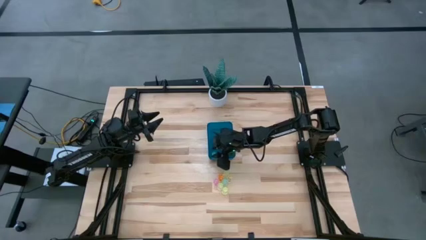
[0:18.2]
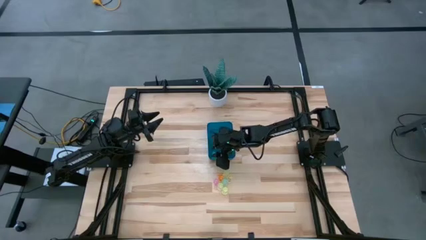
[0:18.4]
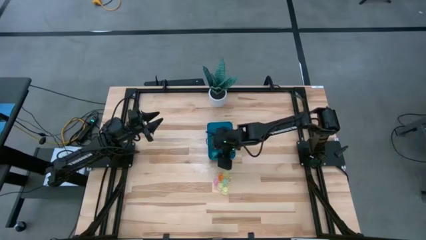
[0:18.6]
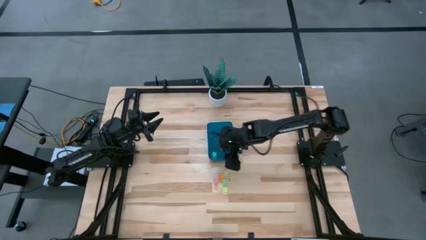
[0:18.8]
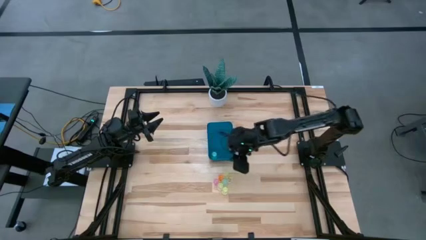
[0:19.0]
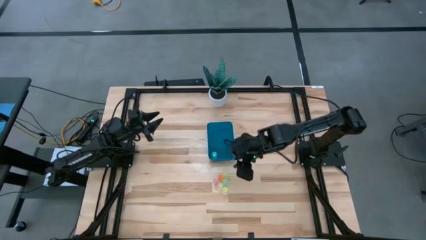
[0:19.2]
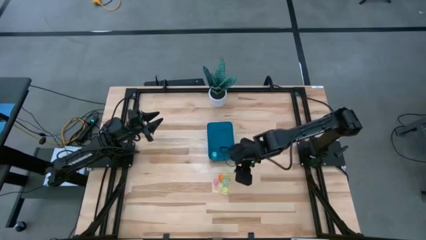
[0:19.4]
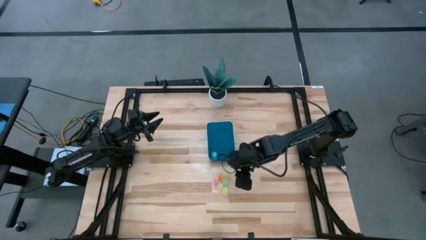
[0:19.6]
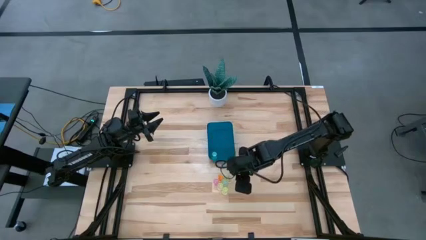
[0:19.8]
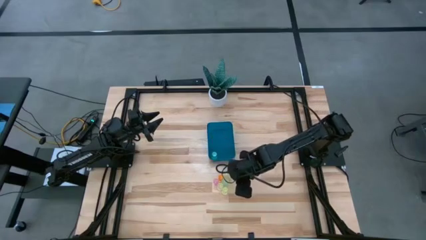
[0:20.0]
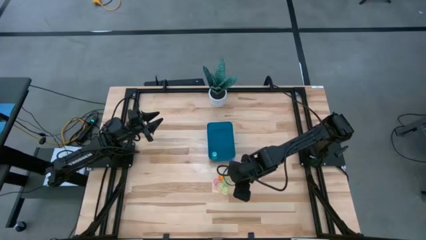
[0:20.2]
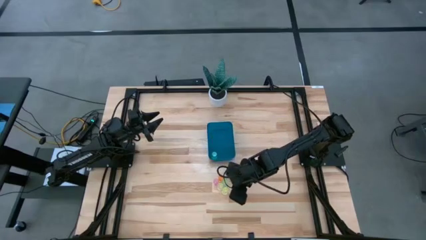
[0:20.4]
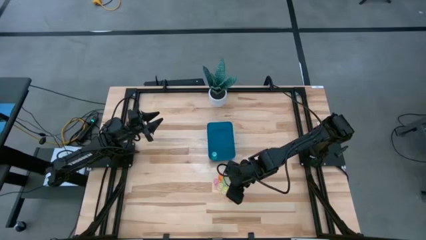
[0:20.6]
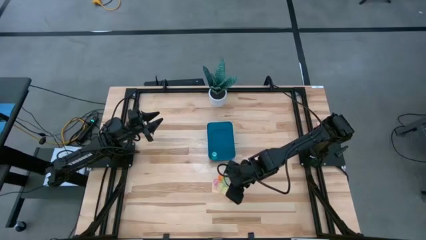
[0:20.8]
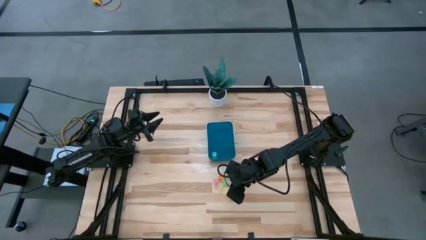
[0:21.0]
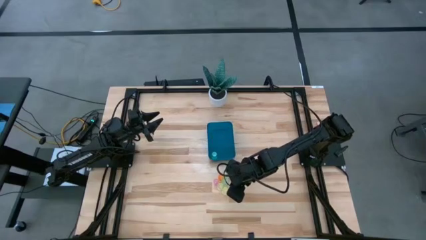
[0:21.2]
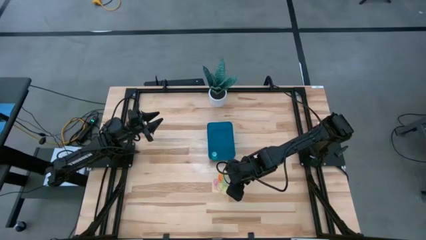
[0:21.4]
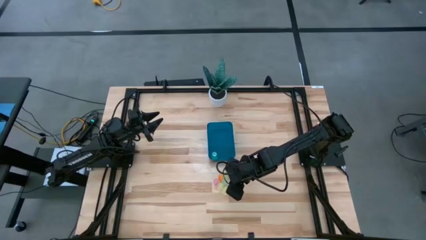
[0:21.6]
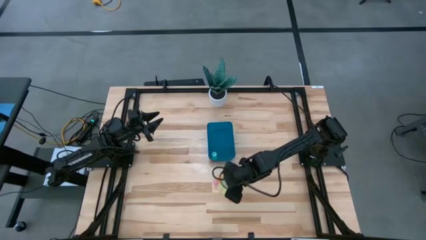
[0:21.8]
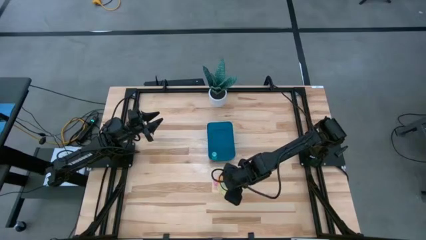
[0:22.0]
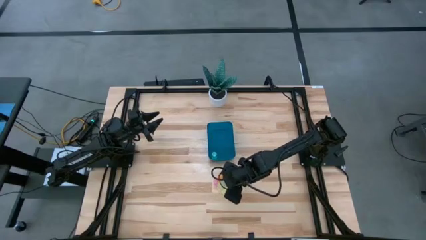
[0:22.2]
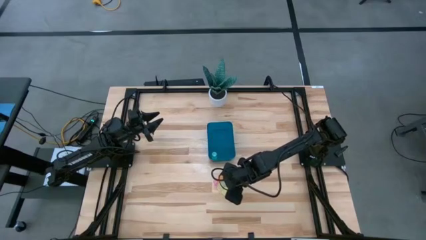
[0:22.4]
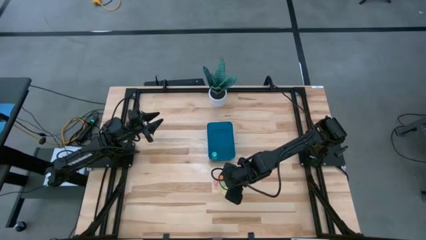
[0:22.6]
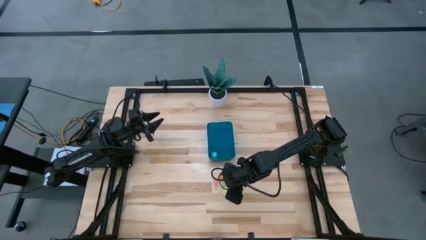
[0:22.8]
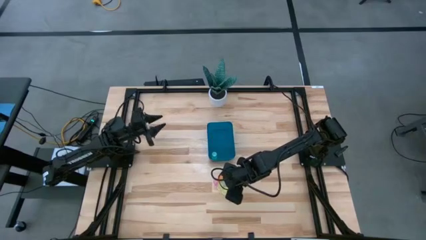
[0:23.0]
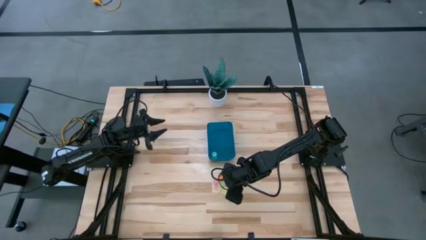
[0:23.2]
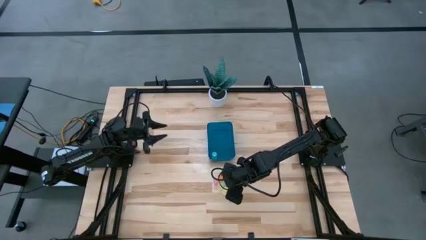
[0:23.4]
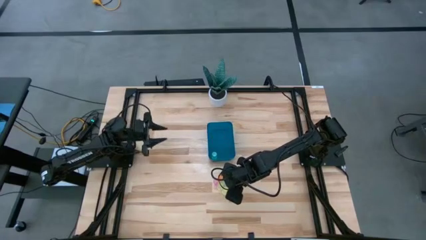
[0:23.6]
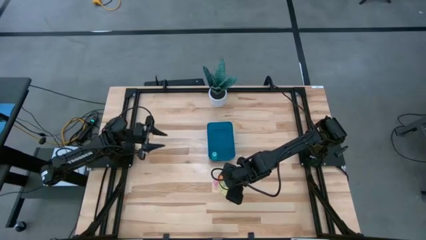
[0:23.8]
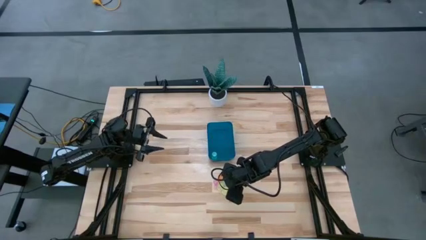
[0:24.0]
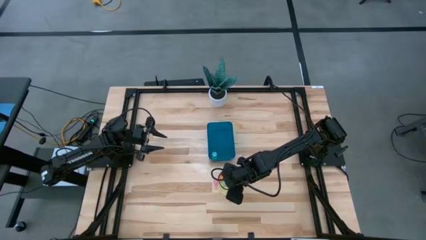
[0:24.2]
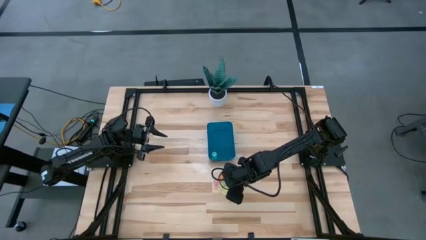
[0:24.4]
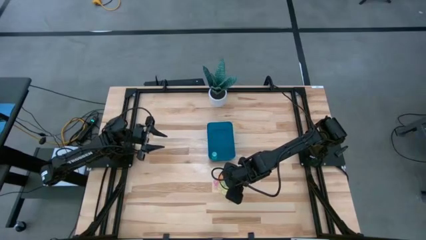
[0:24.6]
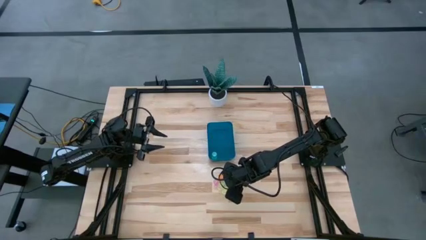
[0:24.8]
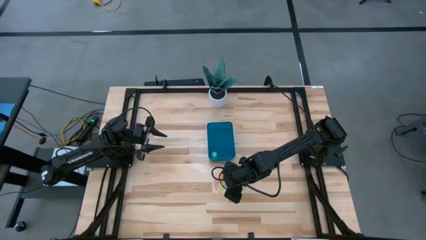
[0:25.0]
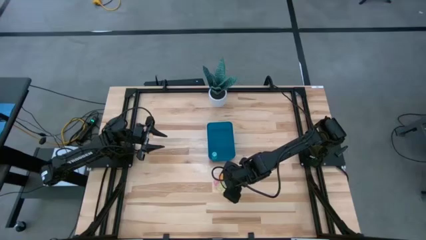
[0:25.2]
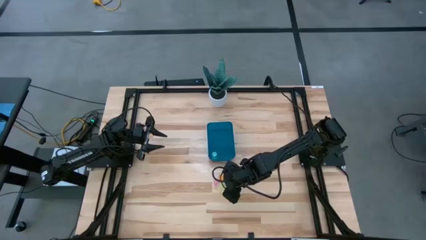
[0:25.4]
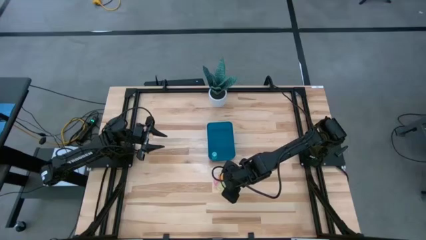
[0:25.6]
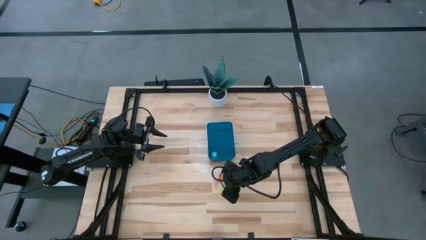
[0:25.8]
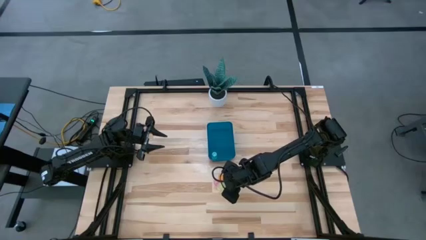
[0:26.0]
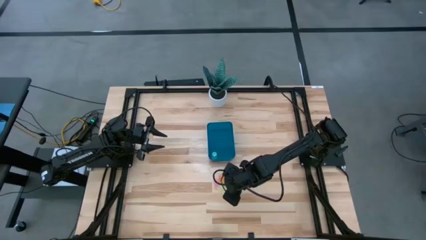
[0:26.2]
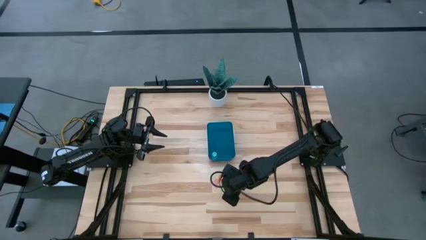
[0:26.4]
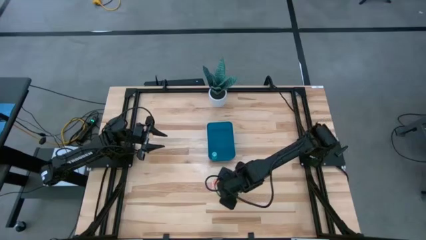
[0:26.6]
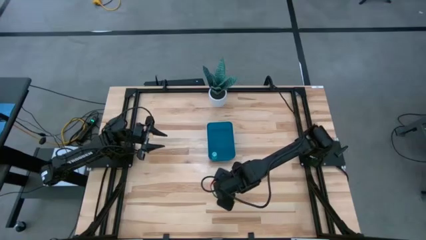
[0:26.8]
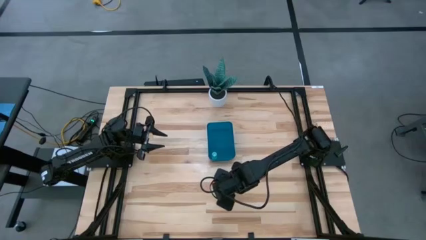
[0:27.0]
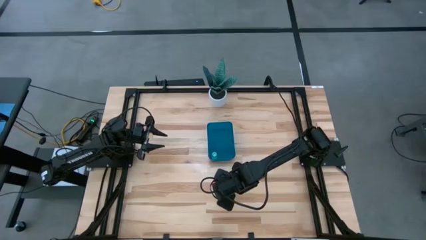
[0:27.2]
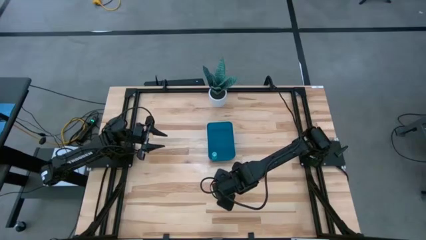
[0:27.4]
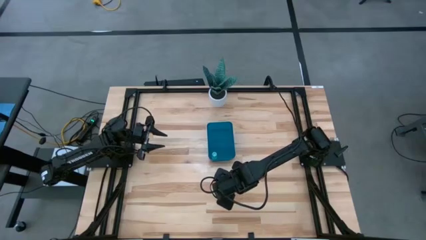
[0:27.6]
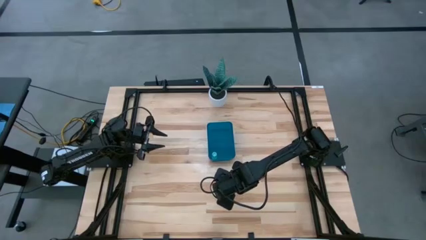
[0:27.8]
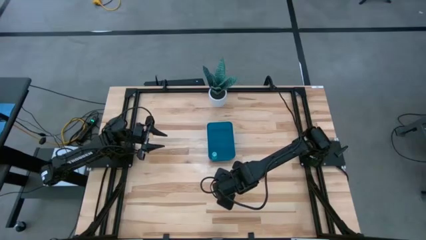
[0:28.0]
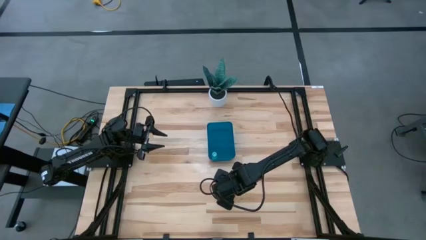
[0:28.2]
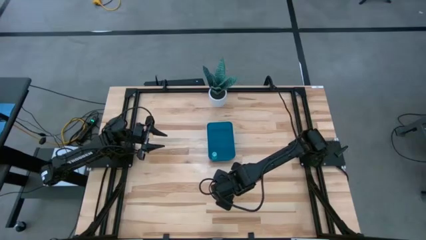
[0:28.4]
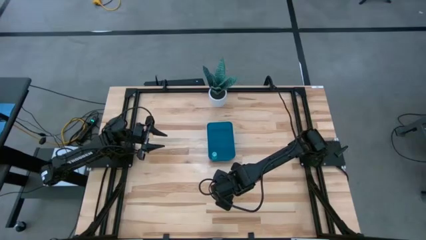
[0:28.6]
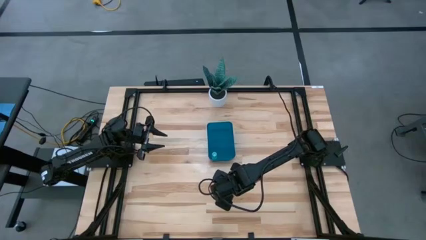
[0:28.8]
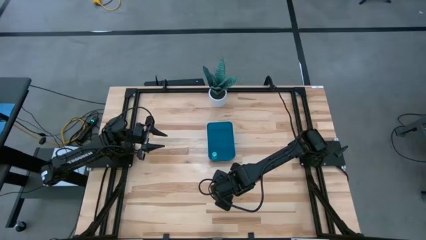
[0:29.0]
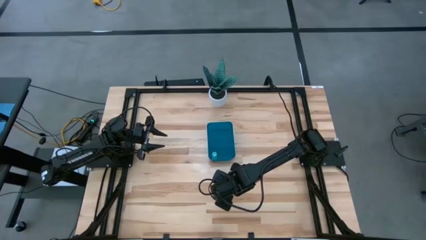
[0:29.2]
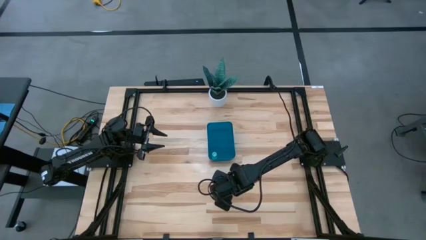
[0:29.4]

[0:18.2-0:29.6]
Task: Pick and place pill bottles into a basket
Put the yellow pill bottle into the blue container
